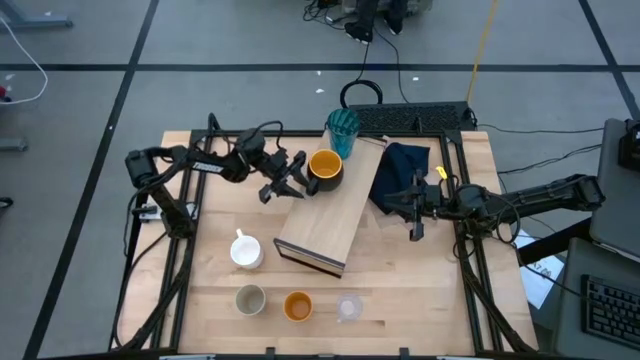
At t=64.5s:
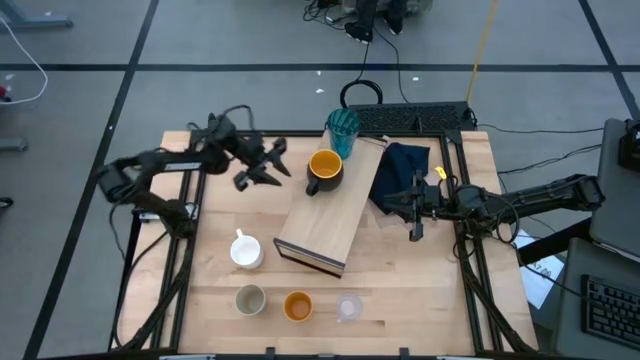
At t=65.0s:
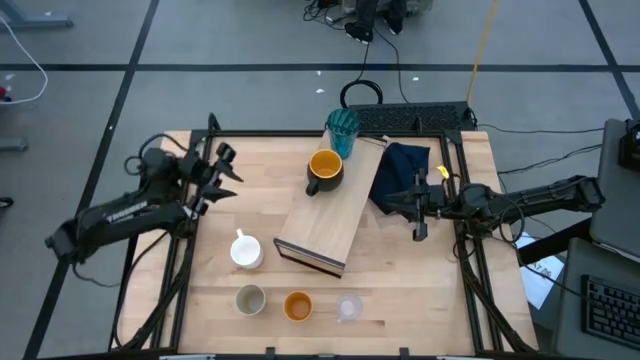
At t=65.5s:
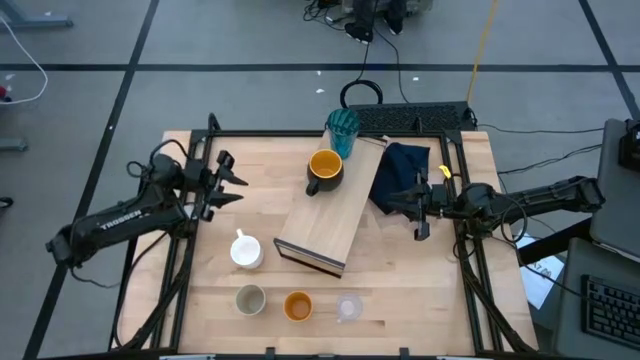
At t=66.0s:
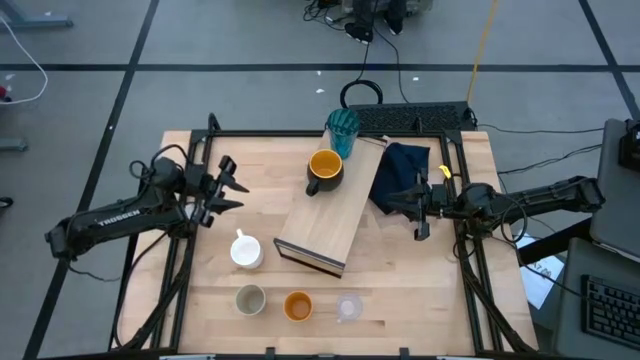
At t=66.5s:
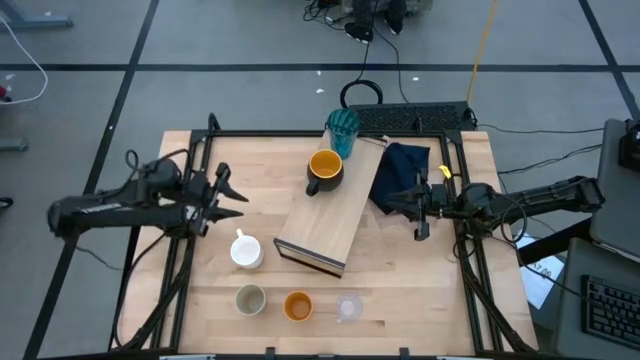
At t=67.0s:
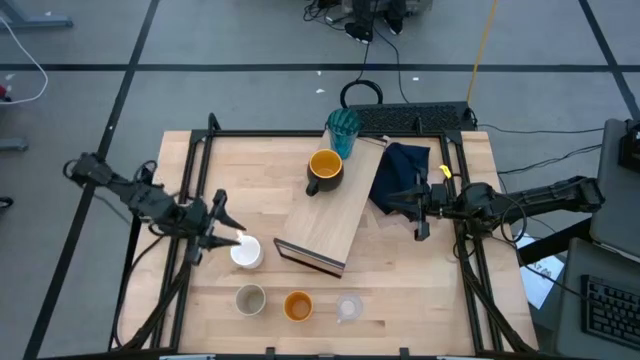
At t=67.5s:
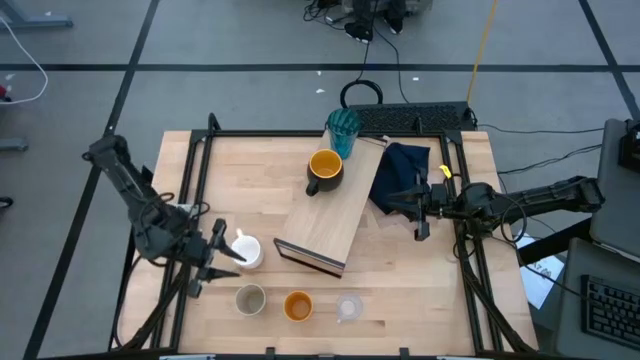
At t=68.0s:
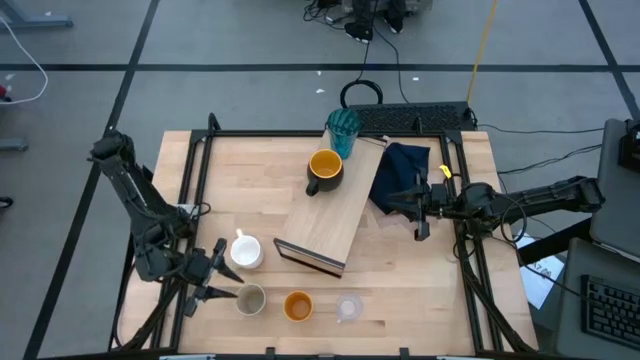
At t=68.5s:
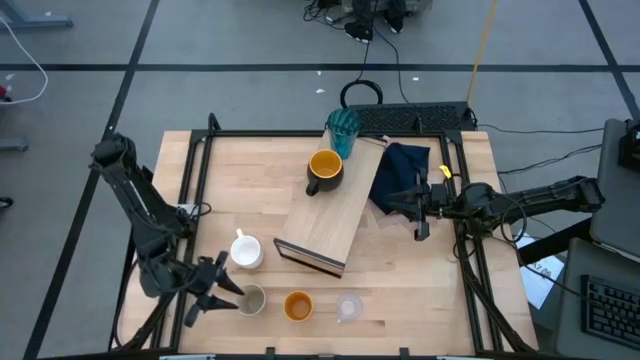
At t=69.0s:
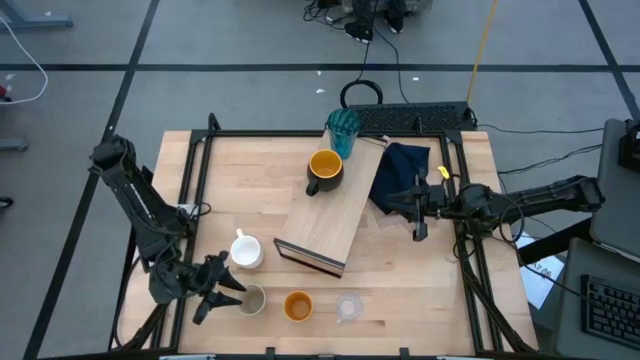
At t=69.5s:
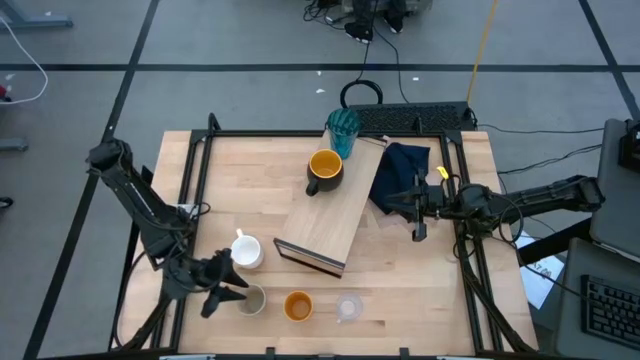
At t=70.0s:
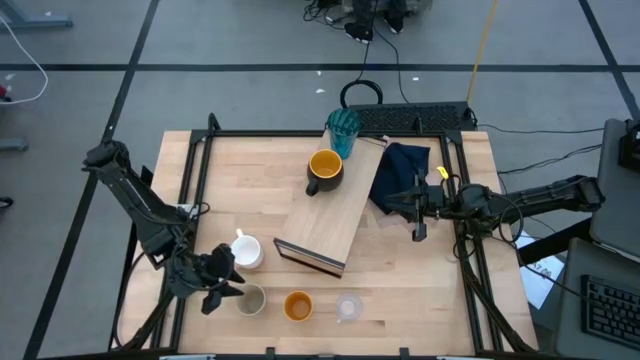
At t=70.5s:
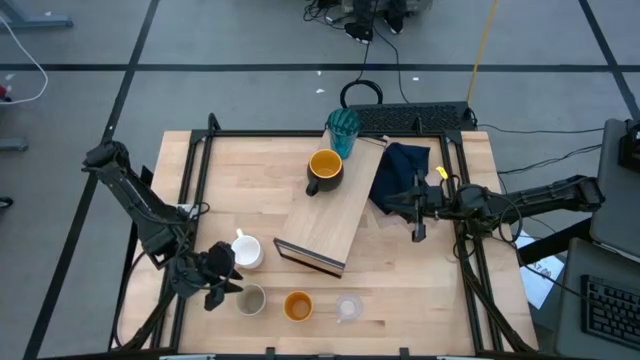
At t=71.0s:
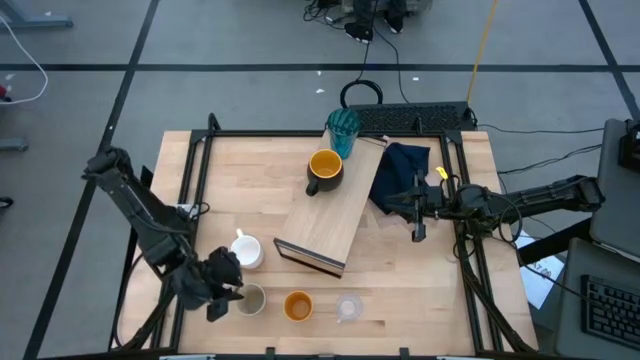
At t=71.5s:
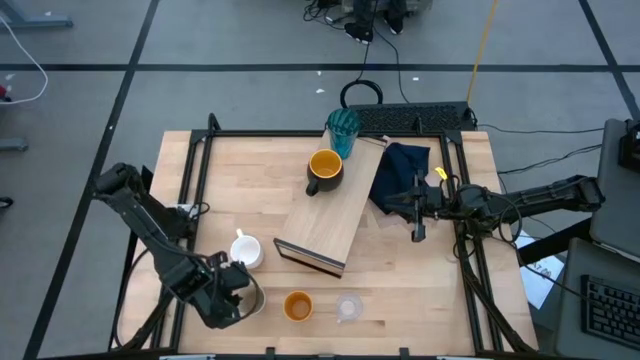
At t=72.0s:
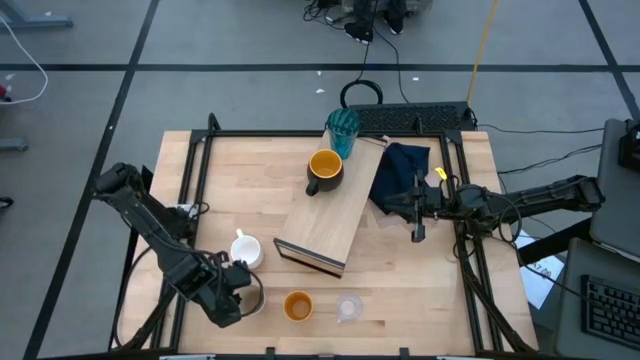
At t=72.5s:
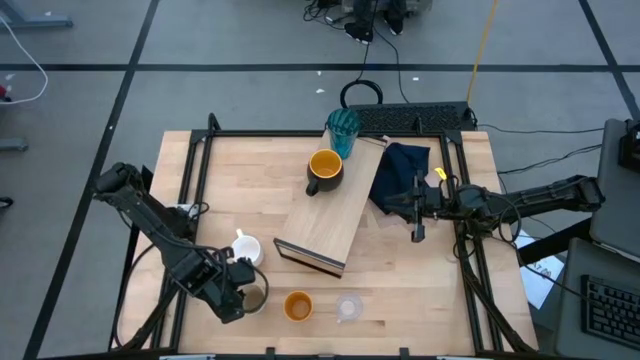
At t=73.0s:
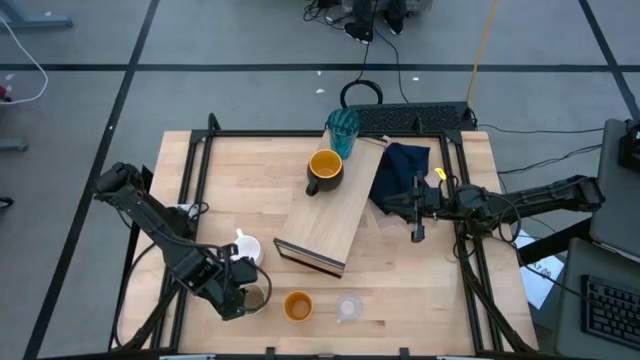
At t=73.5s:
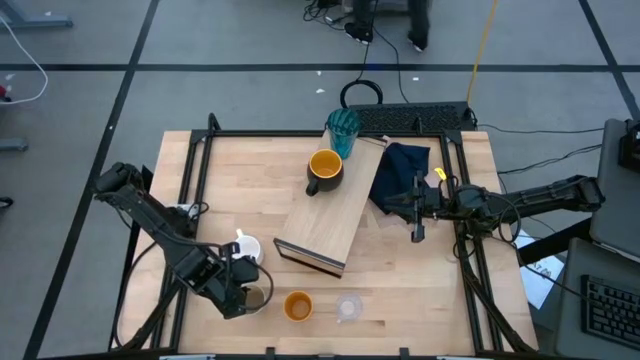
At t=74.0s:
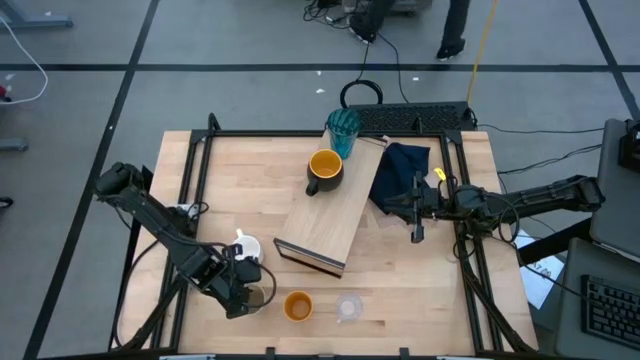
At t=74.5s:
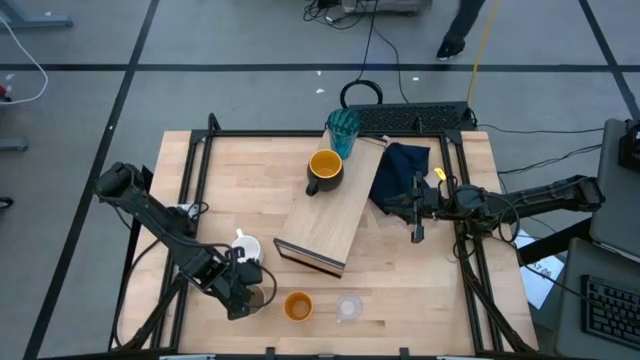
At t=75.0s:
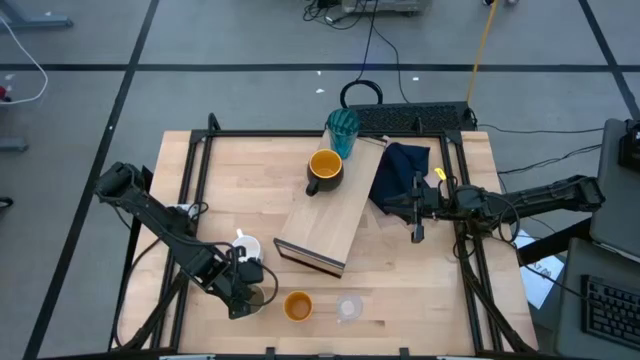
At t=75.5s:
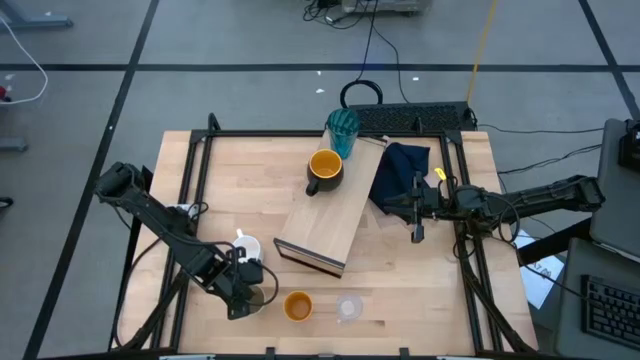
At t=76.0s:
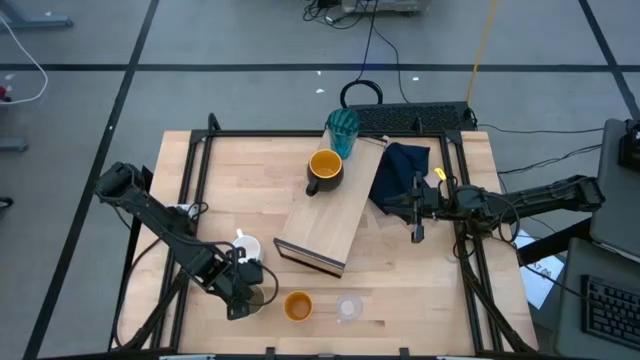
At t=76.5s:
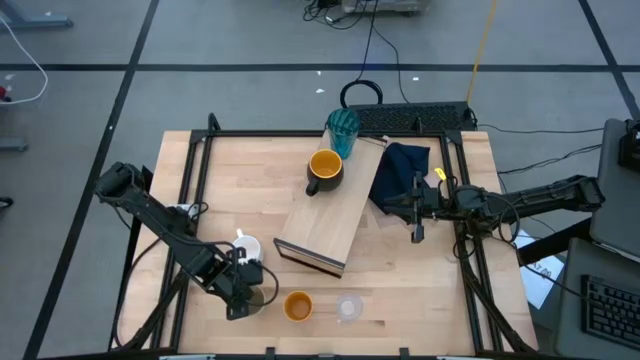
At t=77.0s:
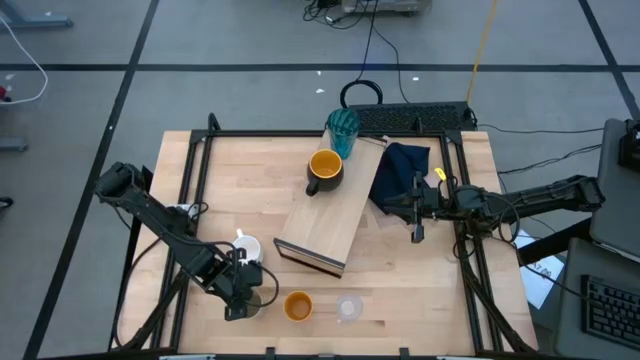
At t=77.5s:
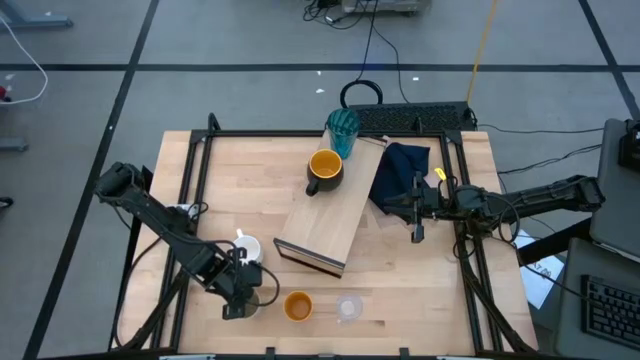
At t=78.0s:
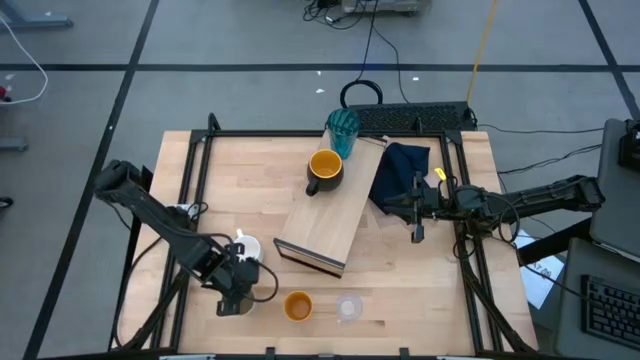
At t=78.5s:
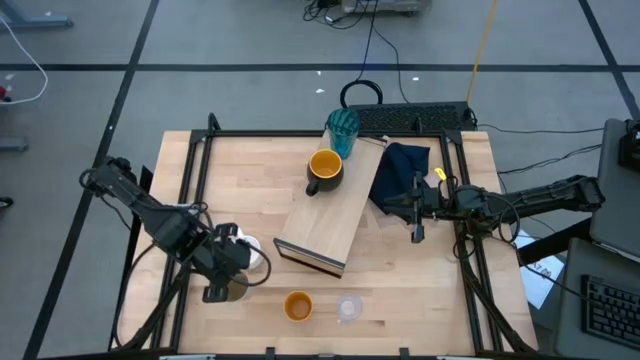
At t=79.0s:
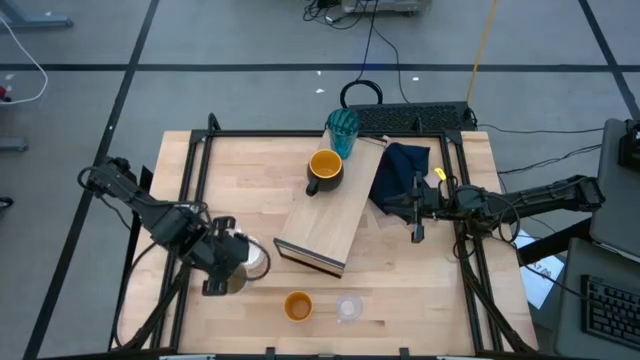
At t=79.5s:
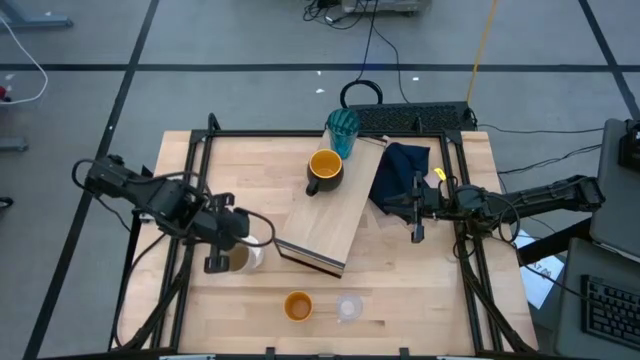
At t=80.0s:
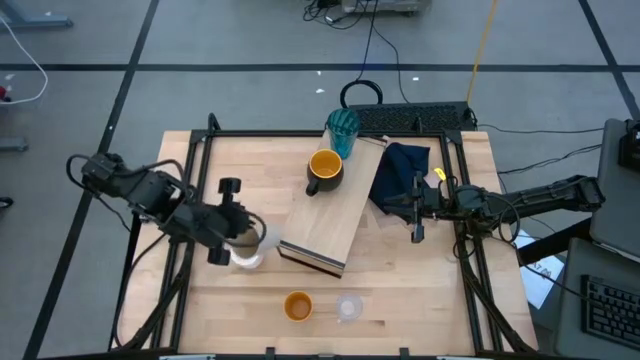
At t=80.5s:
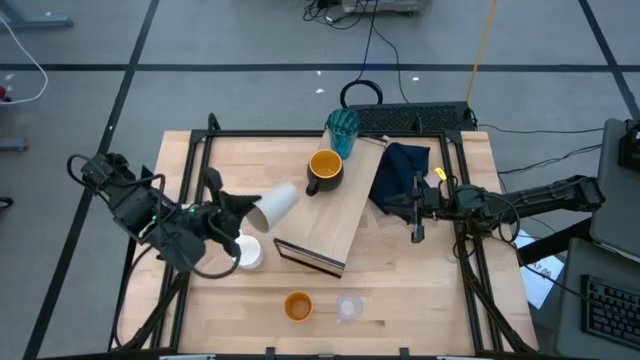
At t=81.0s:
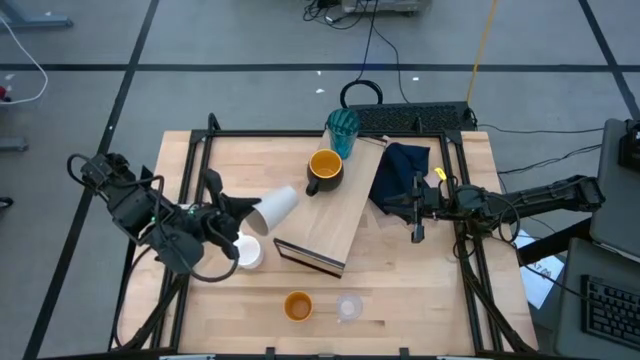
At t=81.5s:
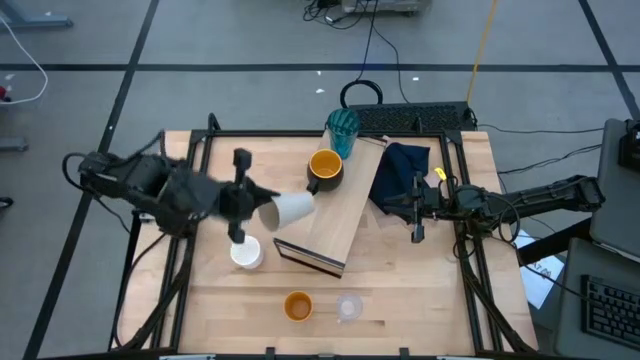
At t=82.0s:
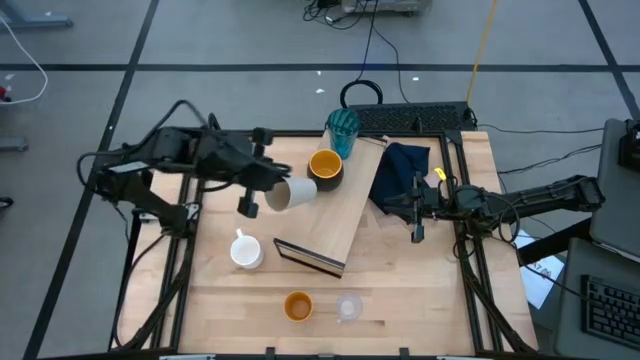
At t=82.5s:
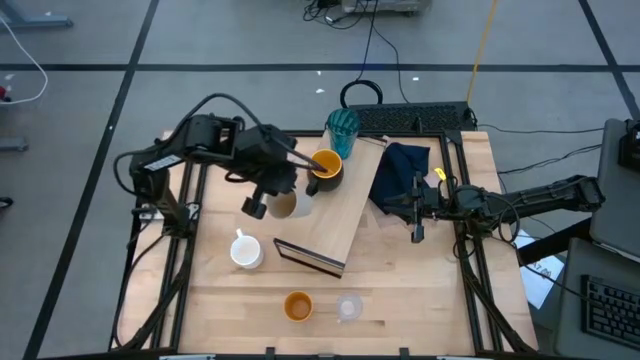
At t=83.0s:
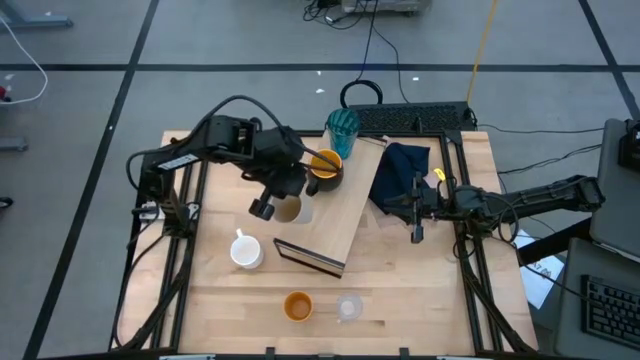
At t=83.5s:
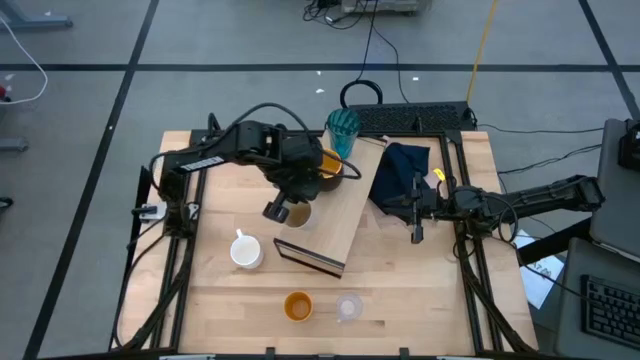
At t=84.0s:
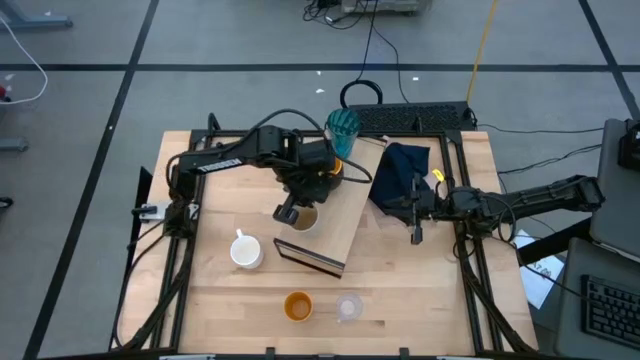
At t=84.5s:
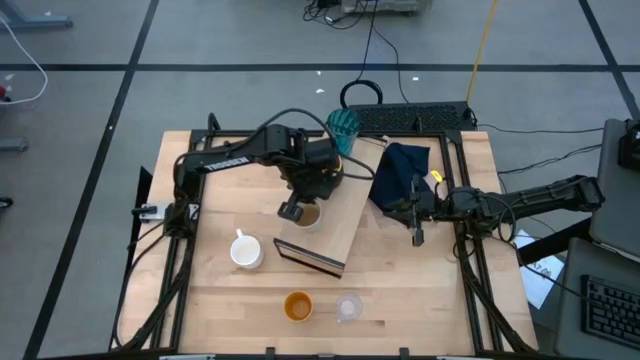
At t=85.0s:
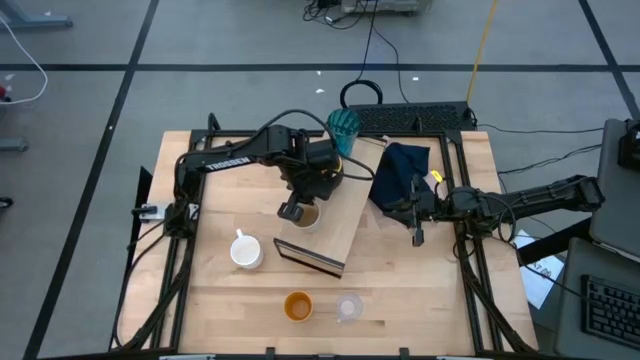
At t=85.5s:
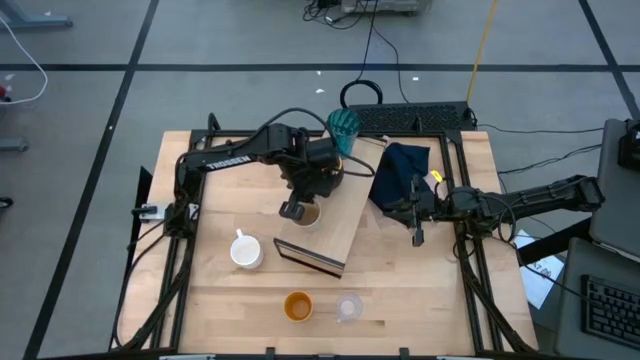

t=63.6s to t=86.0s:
Task: Stack small to large cups/mugs on shelf
Put the gray cup on the shelf
